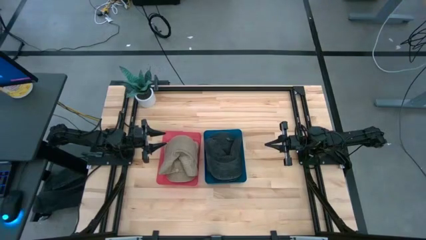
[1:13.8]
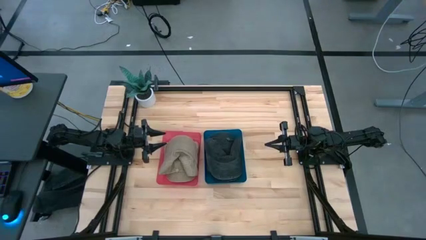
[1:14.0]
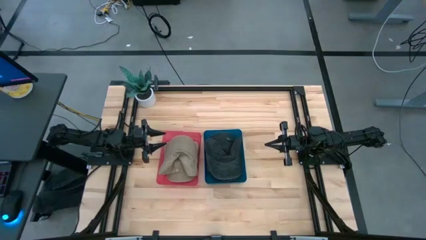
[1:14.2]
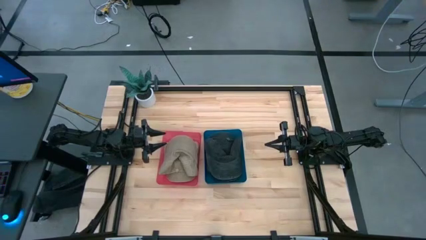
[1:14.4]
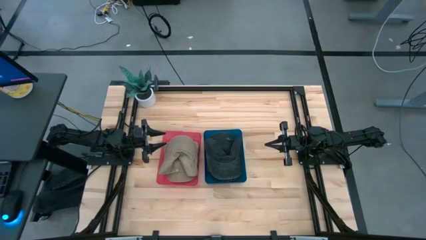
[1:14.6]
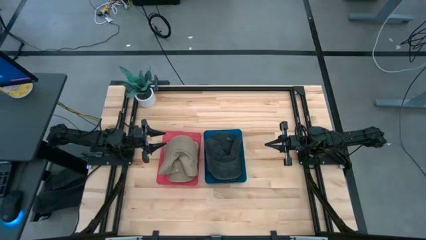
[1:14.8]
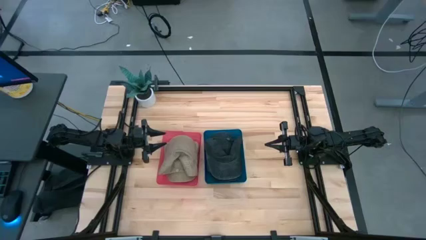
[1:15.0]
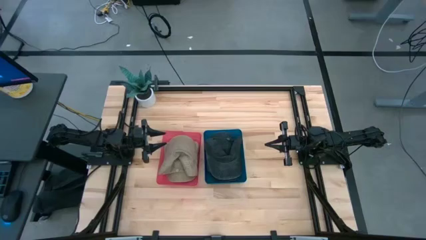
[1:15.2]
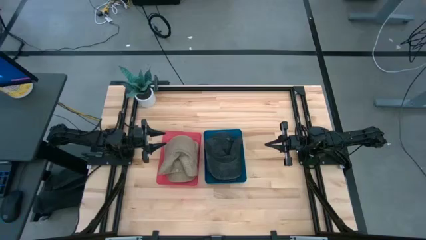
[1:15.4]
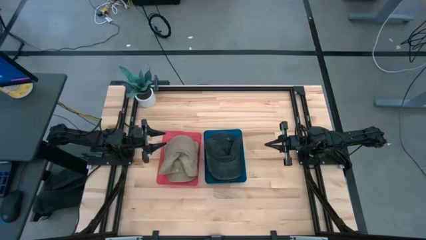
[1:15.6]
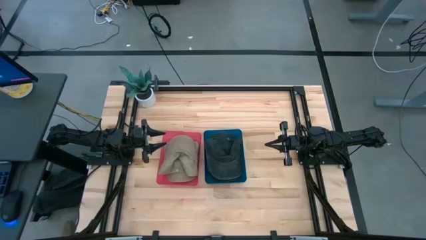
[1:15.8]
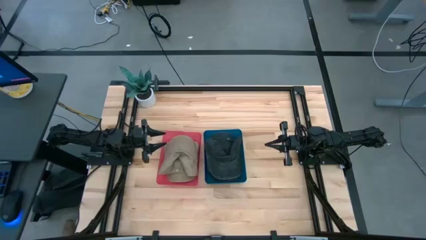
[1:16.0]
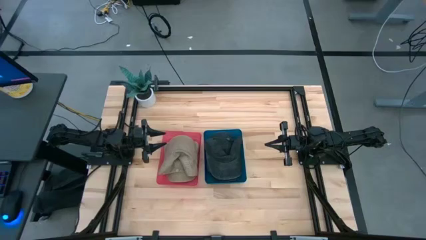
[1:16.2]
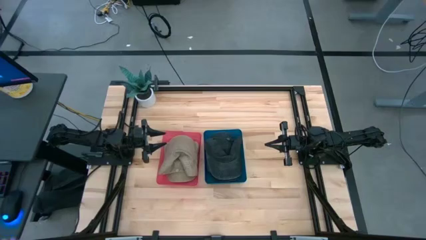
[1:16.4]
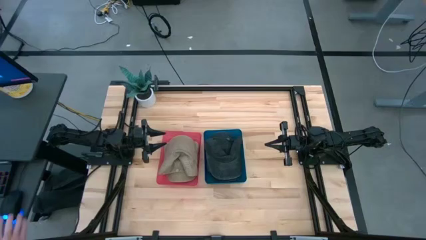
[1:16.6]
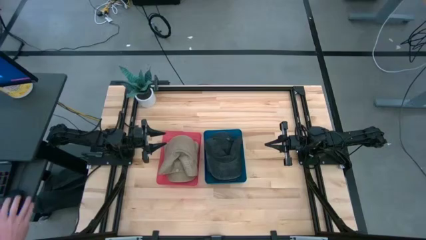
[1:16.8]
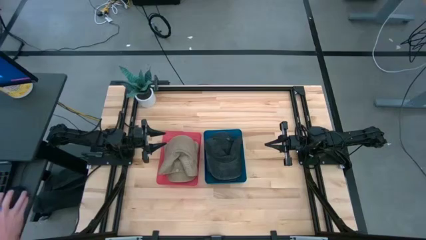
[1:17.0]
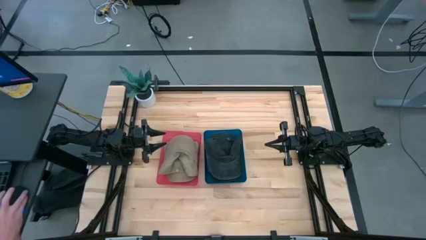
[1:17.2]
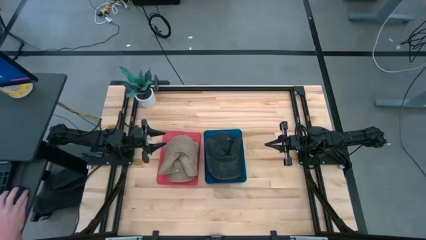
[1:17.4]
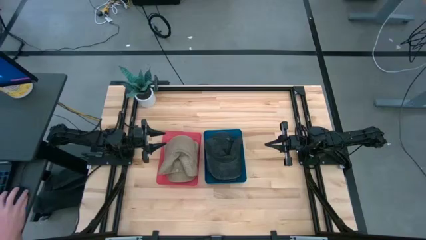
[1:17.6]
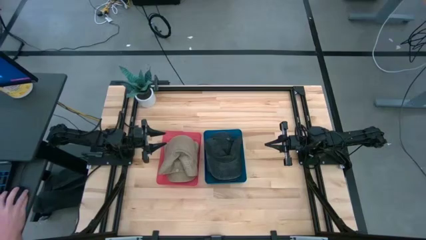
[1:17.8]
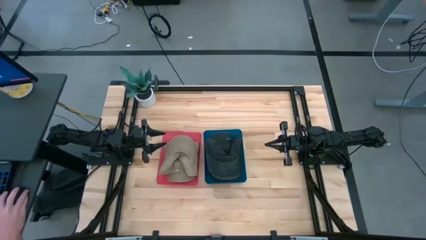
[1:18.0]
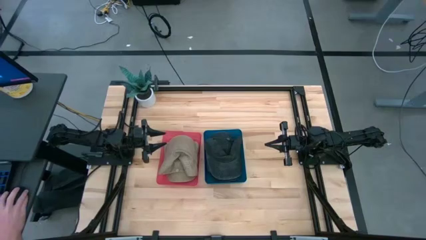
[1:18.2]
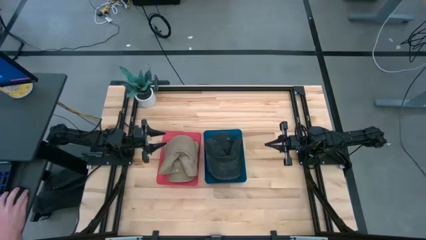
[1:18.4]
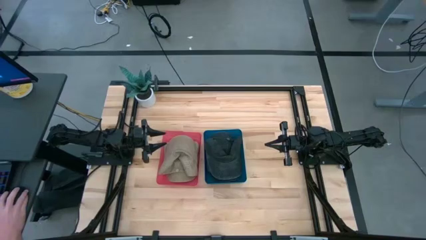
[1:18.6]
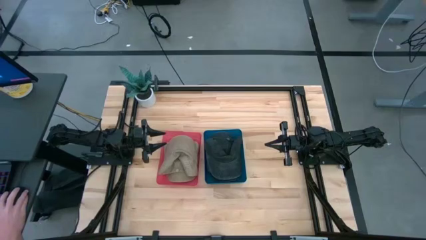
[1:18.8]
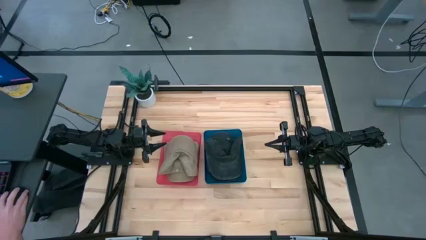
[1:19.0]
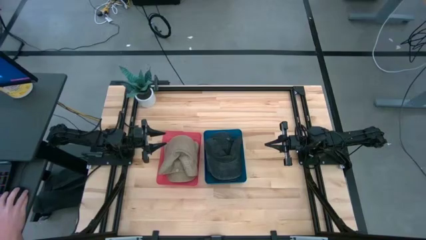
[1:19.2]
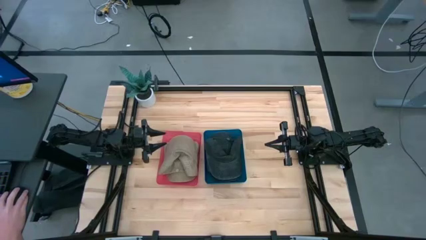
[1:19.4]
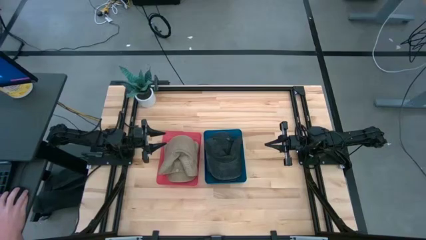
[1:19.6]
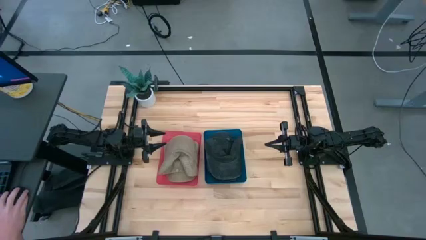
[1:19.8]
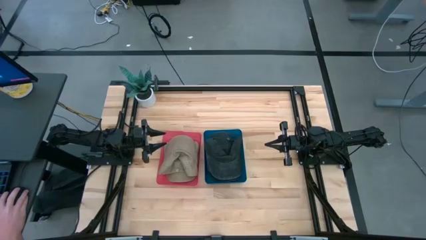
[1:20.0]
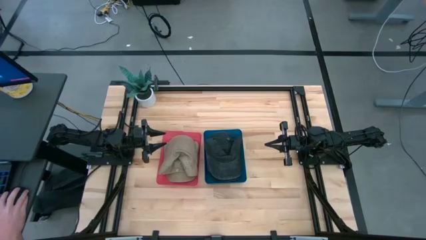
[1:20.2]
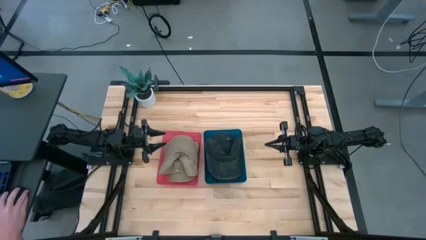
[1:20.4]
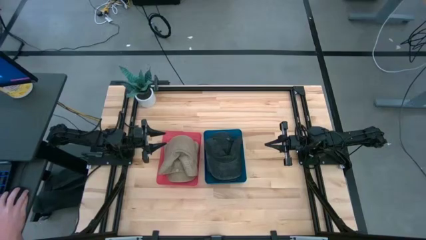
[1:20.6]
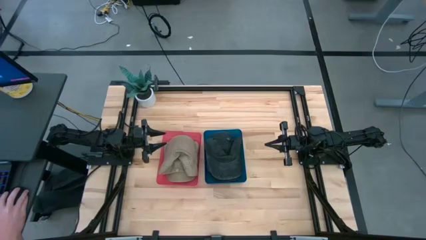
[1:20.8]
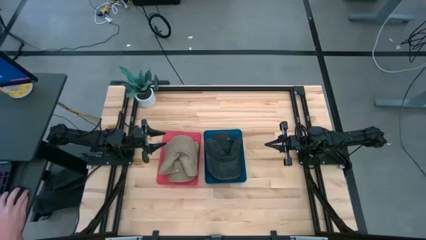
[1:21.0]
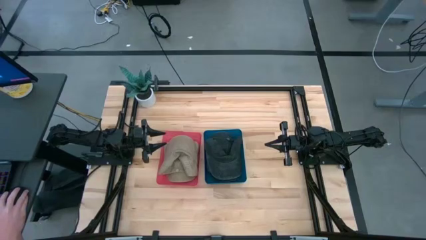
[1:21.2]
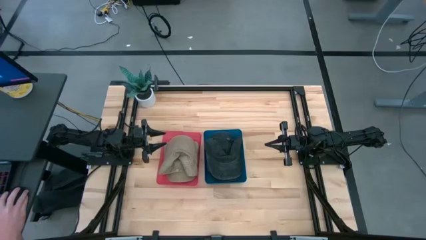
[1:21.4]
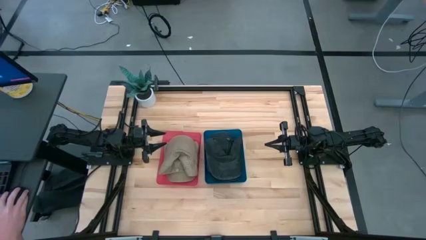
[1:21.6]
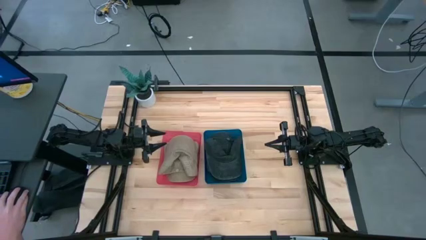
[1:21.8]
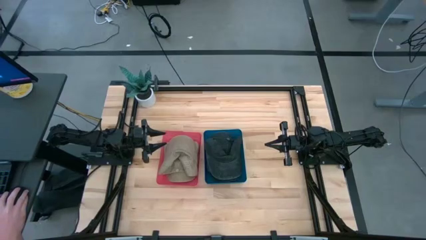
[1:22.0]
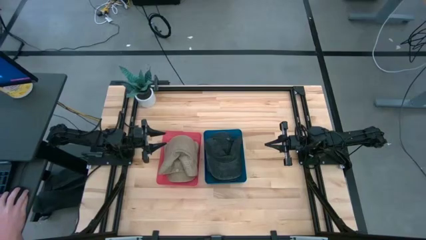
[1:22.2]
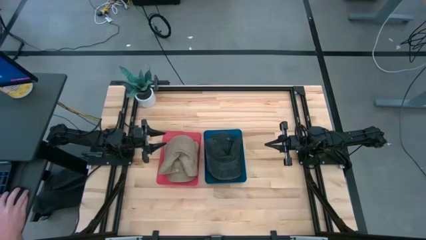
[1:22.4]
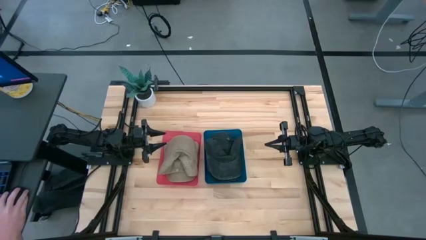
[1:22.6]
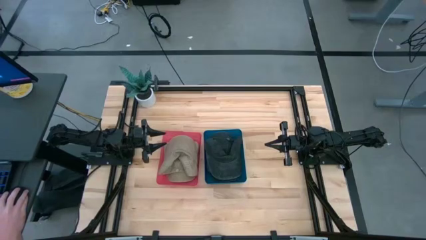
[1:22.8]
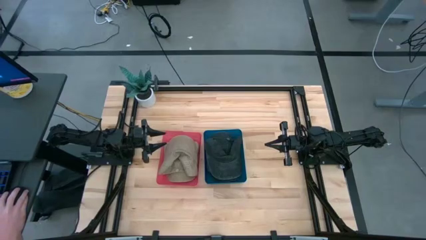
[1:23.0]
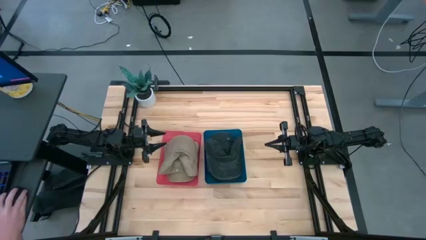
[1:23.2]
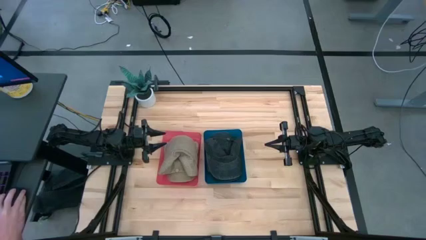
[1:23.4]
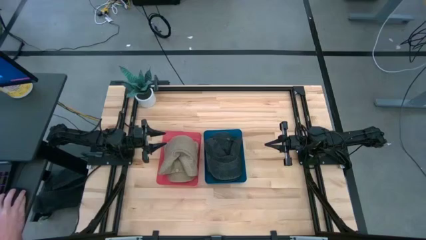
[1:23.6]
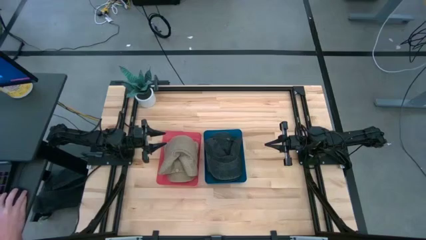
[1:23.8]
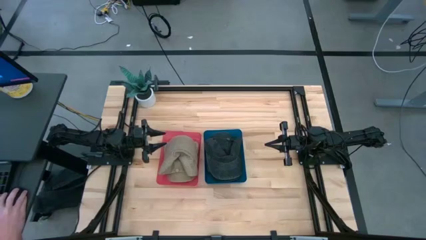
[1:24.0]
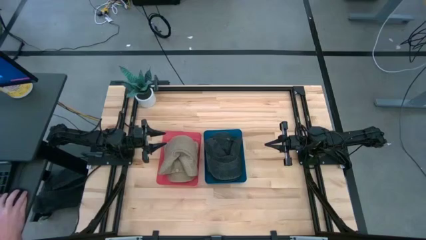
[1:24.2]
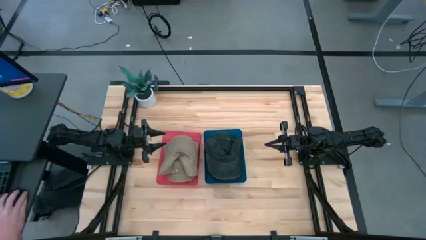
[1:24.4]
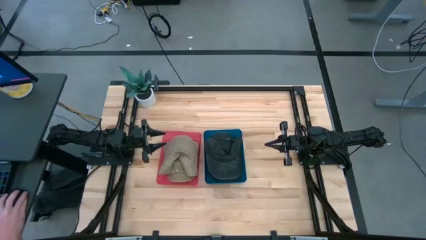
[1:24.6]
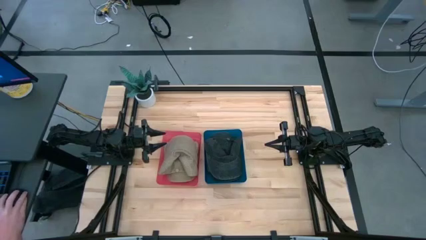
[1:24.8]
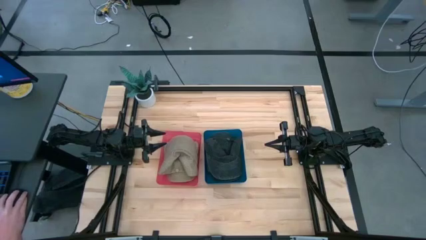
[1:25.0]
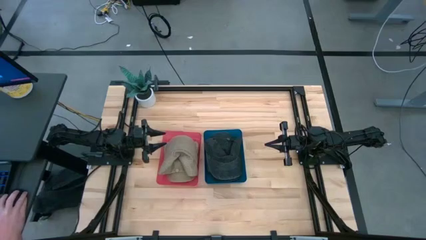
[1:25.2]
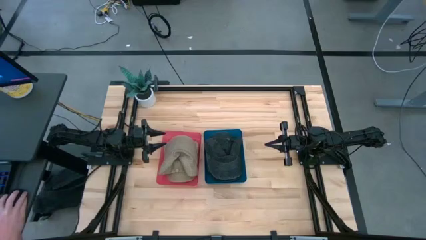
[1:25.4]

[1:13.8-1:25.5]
Task: Pick & Place hat
Return to Home Position

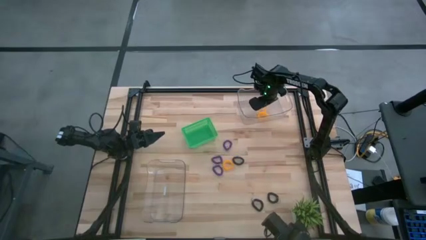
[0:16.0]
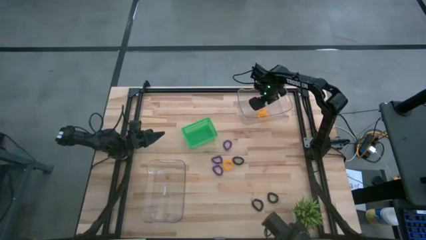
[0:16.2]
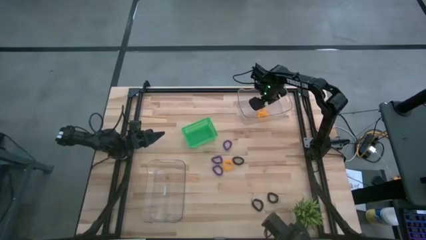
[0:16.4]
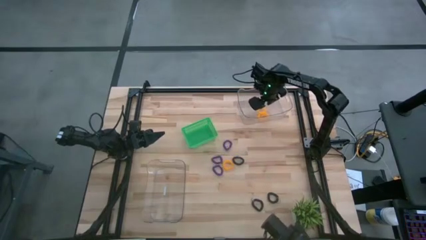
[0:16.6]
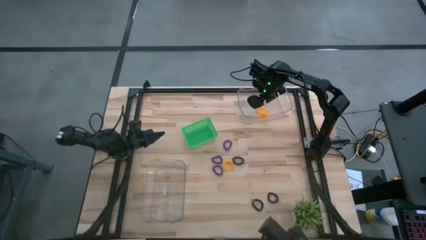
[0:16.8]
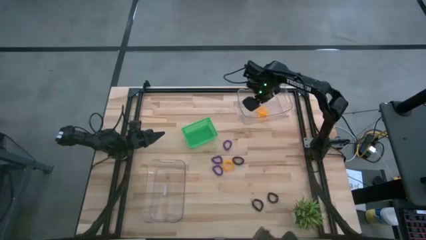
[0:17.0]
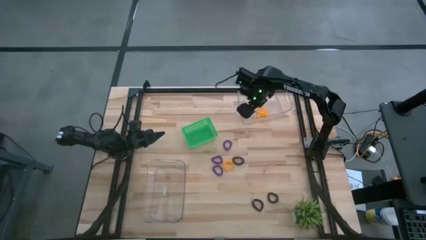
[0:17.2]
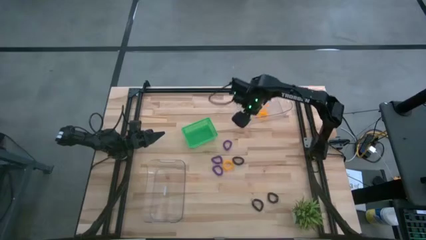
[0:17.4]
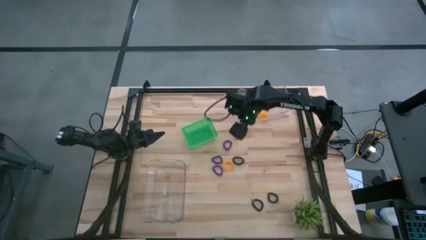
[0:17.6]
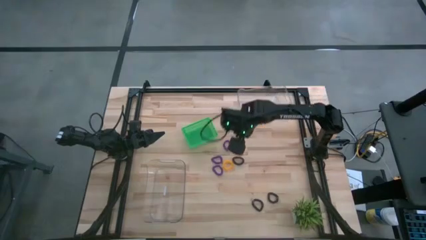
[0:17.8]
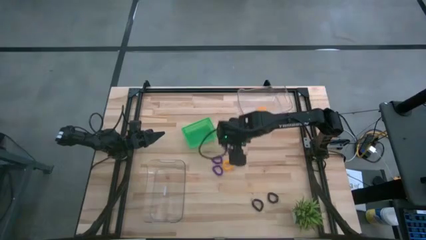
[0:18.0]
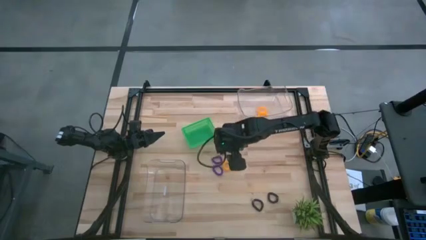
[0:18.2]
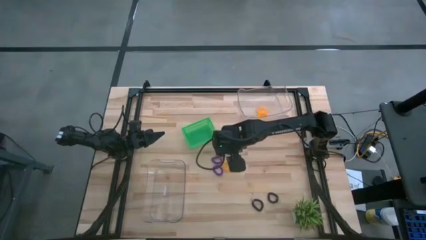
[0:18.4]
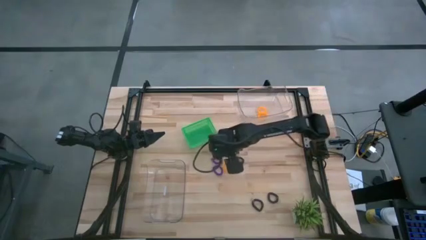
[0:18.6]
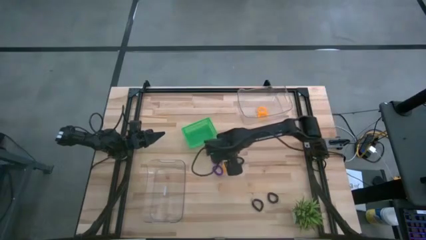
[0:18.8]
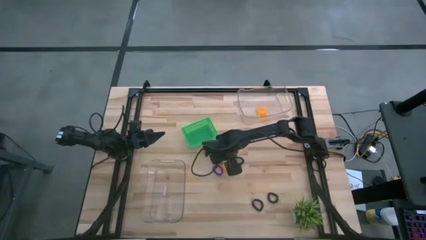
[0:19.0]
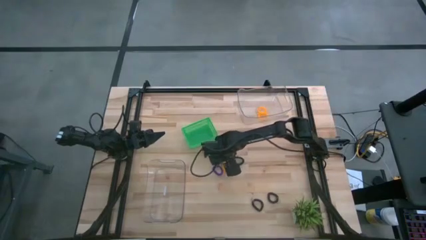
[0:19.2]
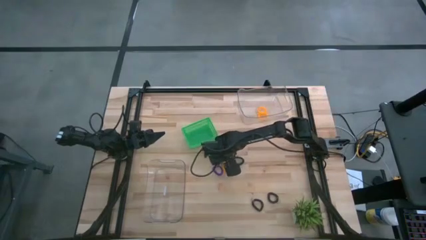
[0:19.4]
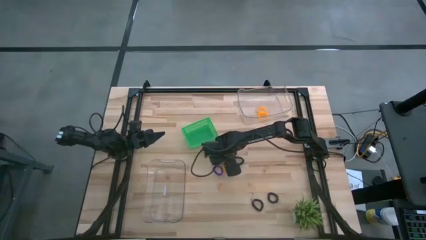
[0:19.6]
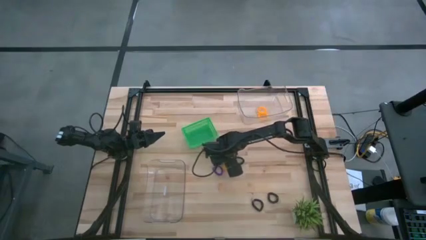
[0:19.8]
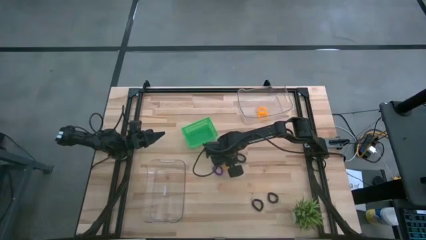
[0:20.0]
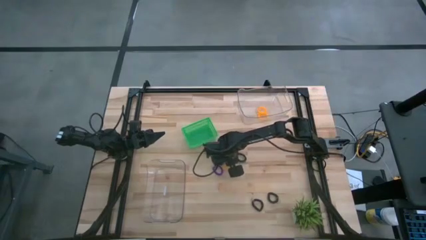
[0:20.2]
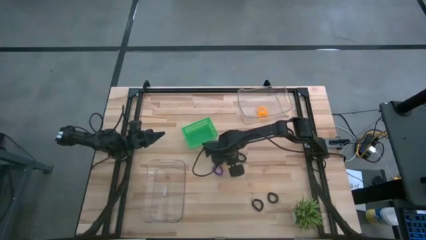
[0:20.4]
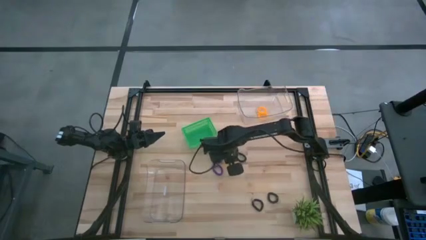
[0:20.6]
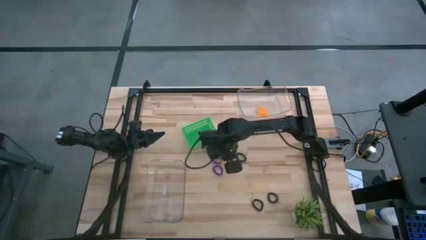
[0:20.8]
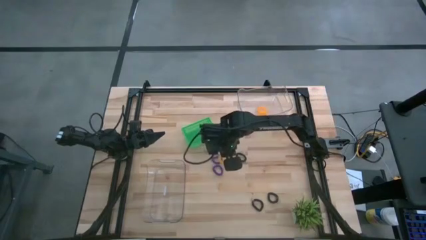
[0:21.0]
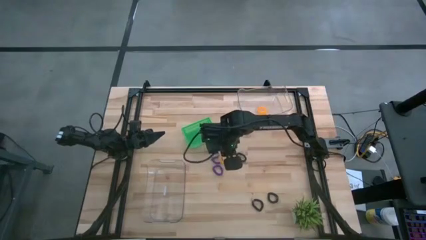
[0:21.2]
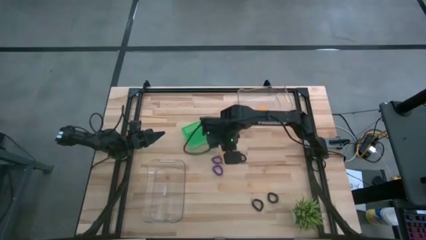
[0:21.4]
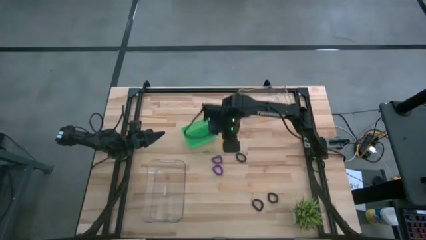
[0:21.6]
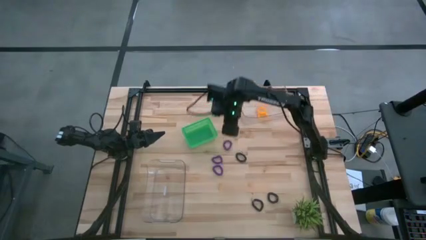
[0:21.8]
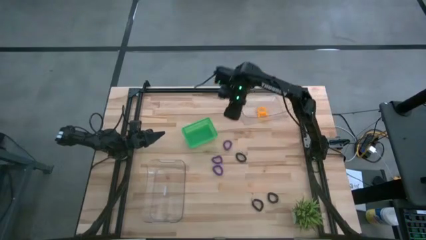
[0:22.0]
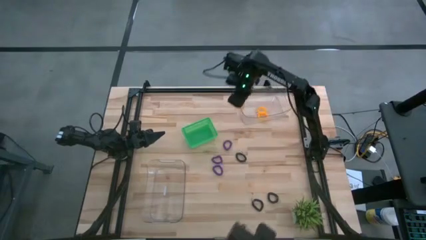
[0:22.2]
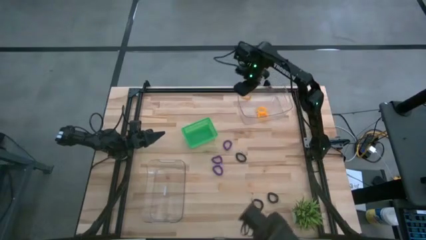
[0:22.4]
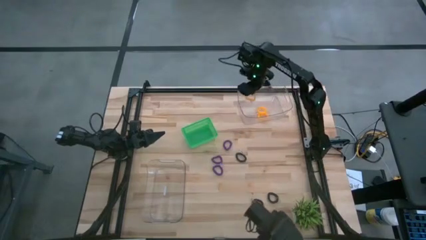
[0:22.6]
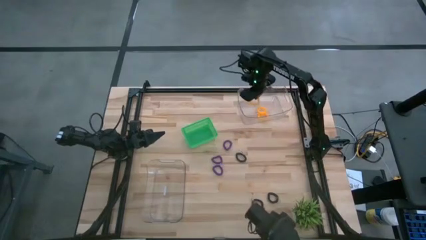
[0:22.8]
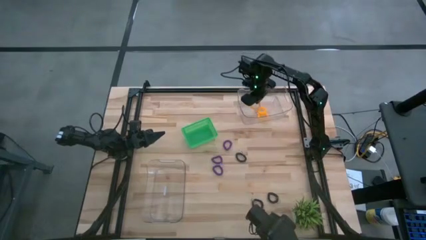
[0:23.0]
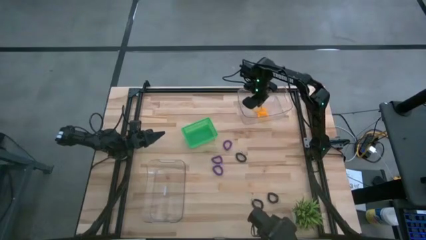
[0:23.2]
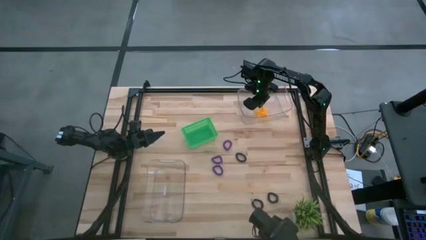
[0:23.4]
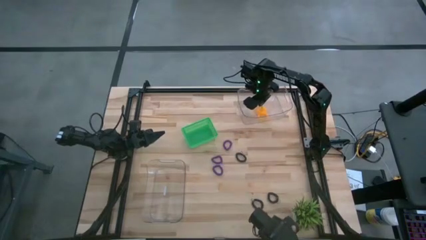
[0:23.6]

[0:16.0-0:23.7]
Task: Sort spring keychains
Put the yellow spring keychain into the top transparent bin
